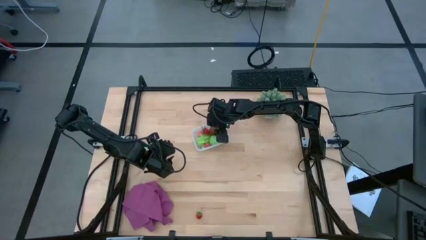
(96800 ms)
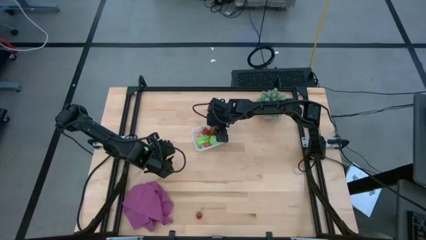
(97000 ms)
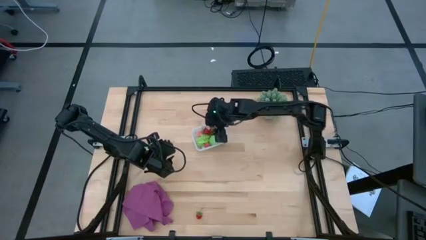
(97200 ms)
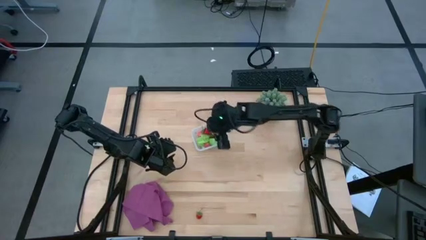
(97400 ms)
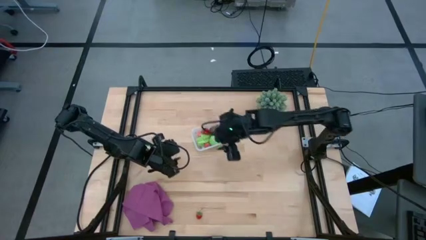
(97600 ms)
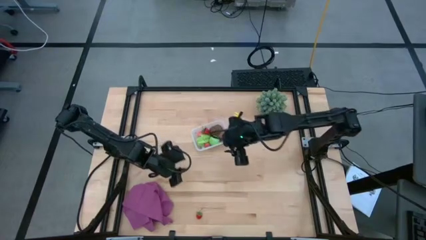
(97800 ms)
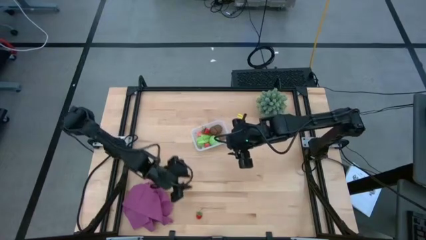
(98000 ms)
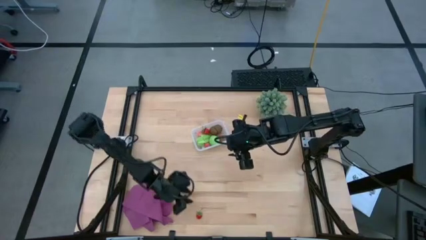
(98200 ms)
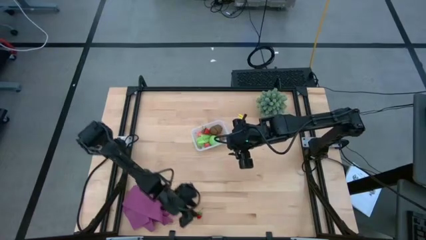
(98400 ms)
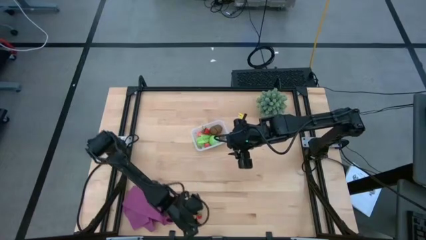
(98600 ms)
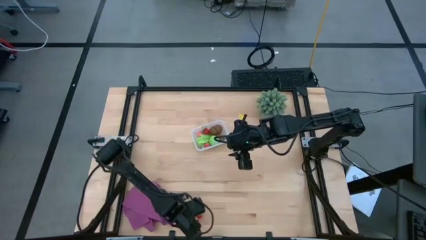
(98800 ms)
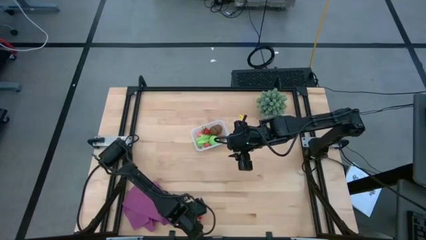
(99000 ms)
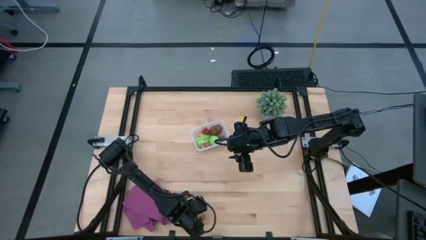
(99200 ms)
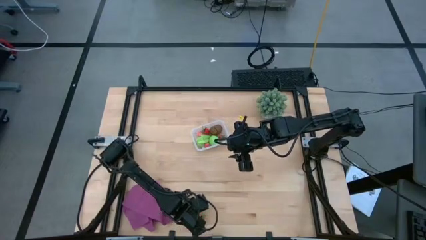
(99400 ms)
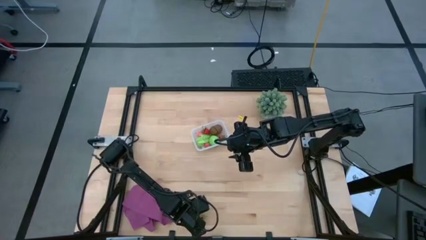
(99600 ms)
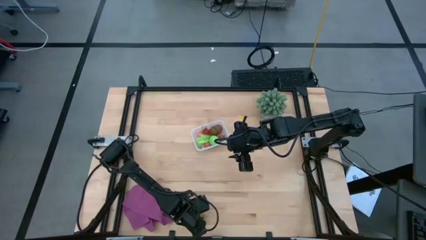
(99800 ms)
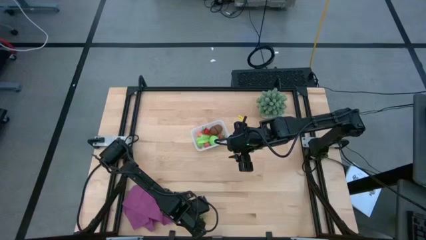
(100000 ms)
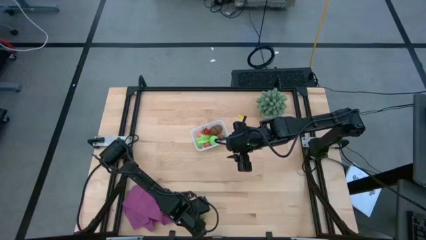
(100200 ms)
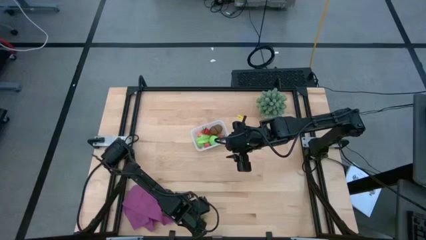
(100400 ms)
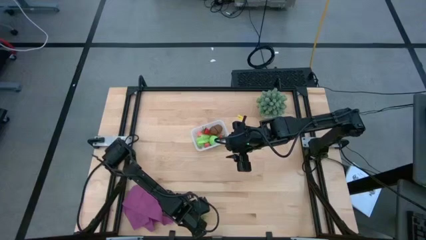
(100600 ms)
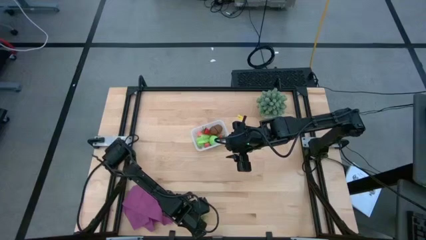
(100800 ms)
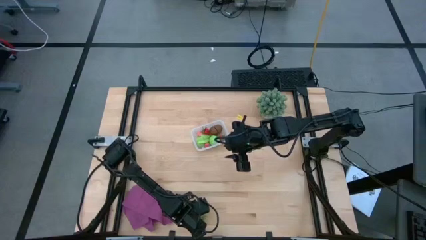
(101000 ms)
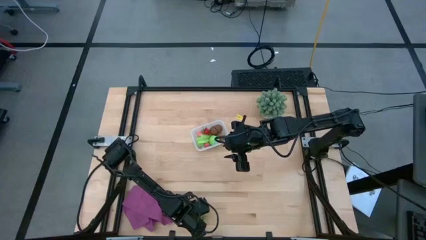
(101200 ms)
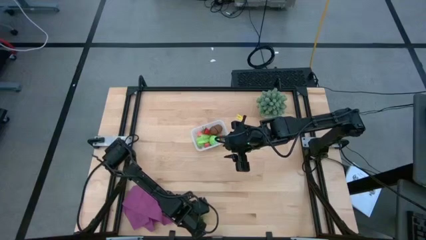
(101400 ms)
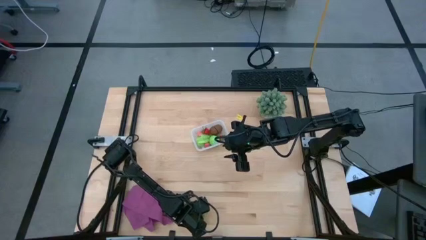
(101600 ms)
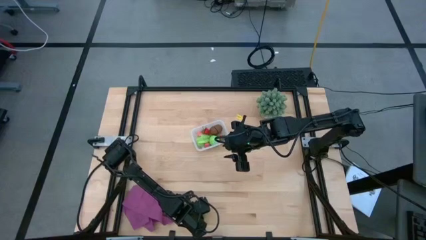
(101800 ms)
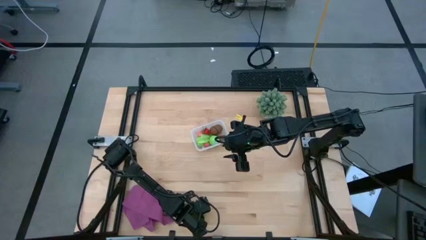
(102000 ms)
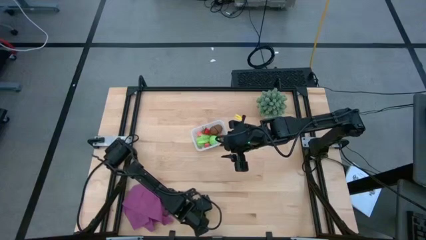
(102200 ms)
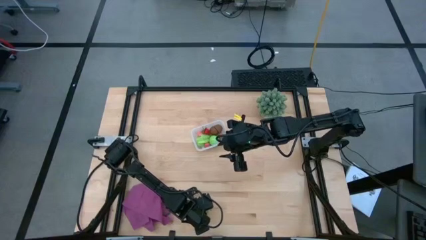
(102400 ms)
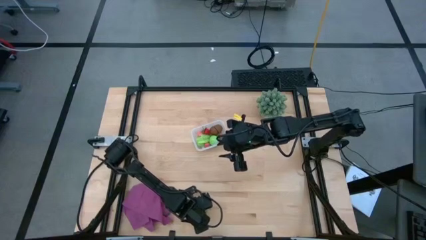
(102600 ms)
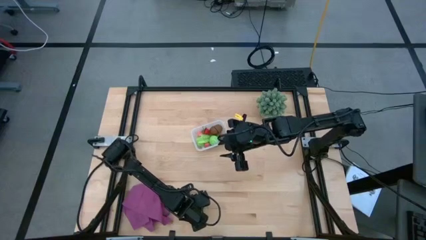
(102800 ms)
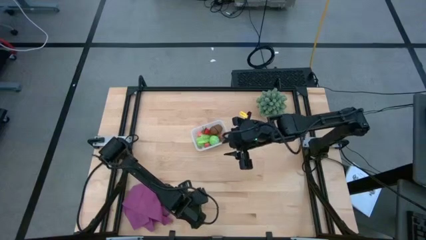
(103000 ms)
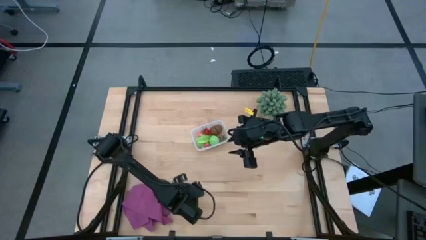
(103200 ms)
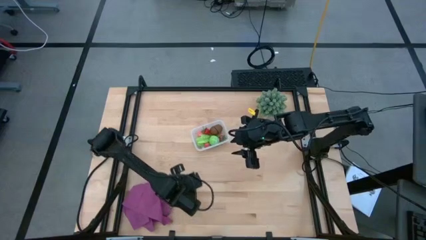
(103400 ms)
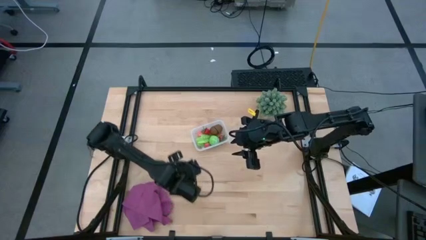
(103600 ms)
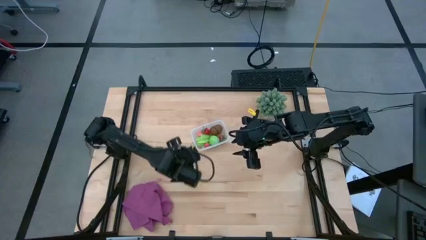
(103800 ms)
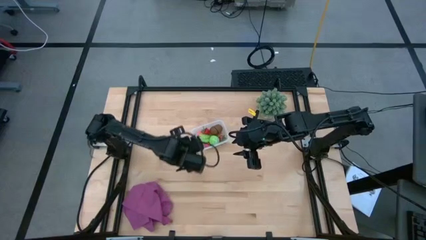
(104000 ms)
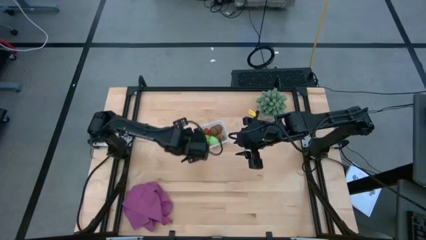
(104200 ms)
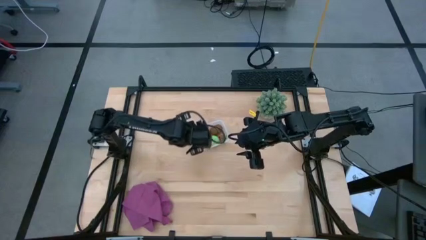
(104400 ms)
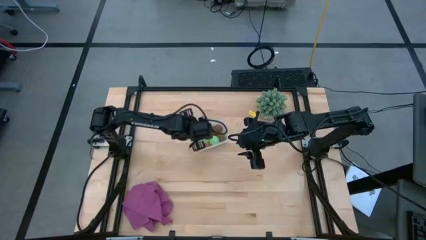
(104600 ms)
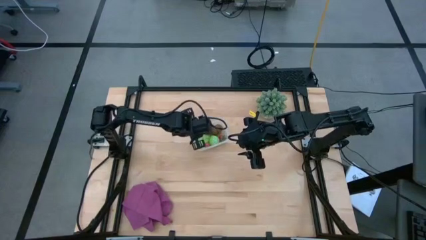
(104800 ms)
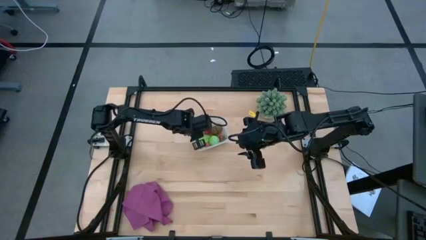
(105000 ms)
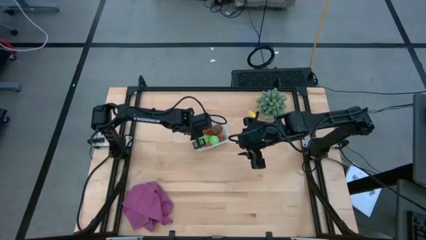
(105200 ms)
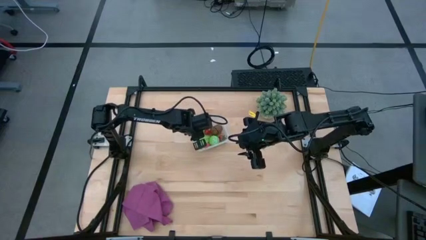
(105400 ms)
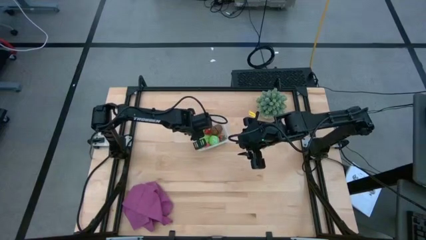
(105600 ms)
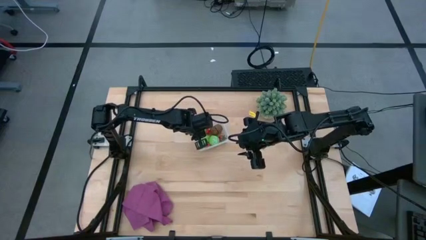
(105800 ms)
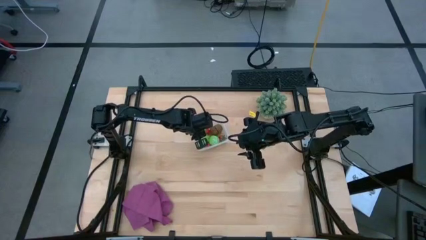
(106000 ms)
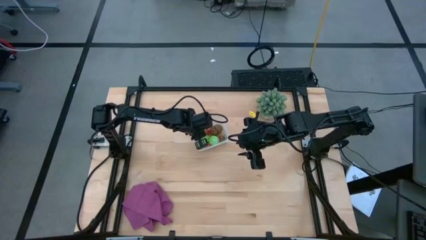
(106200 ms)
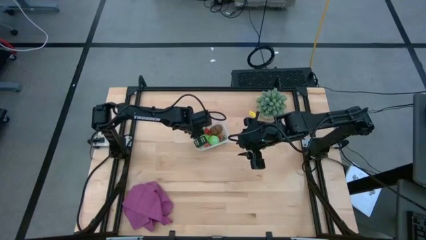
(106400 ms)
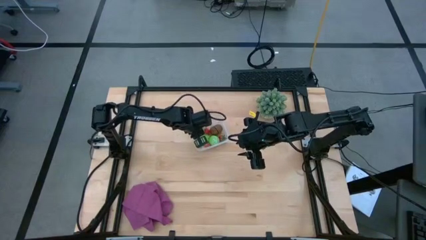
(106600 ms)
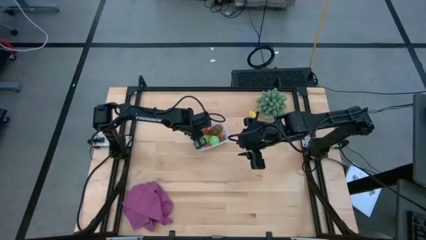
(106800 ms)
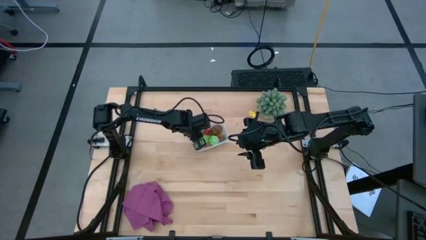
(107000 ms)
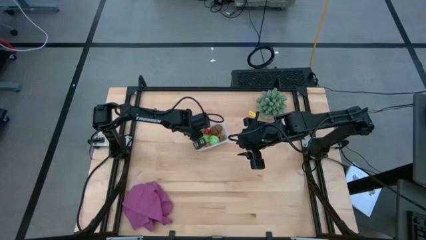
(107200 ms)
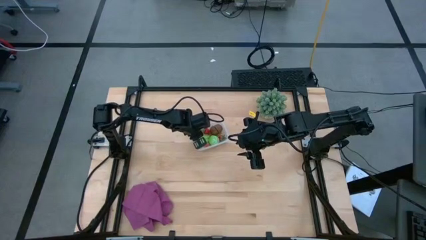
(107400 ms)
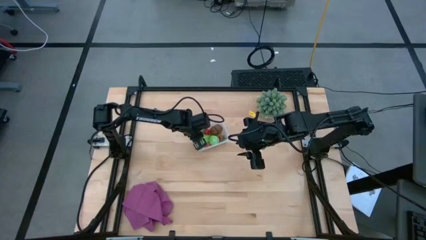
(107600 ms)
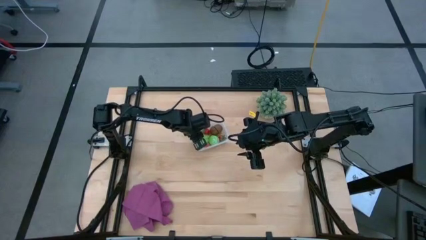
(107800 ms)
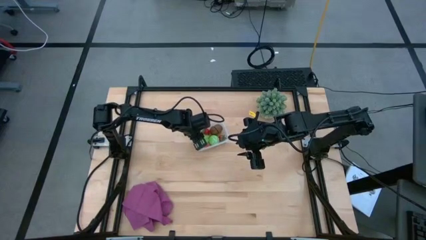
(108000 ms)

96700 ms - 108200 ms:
Task: Pick and placing Produce into tupperware
Put the red strawberry into the transparent container

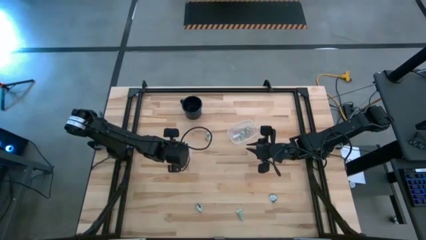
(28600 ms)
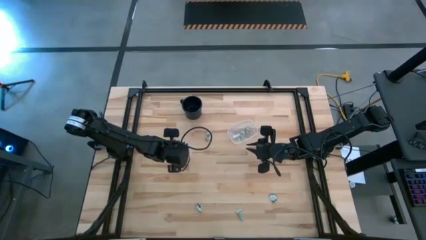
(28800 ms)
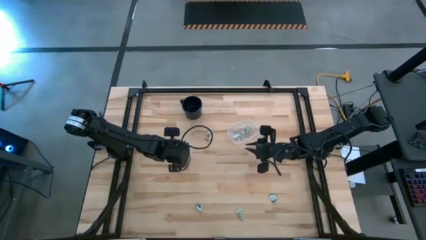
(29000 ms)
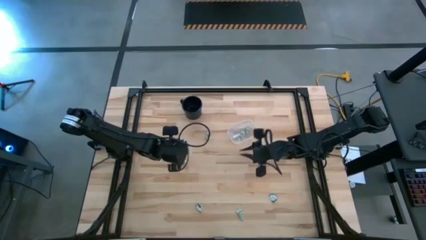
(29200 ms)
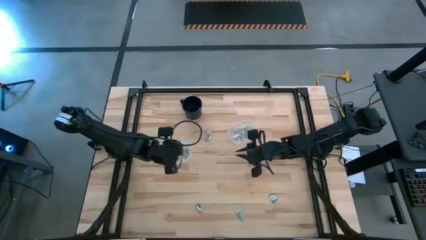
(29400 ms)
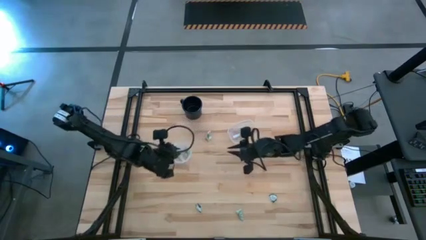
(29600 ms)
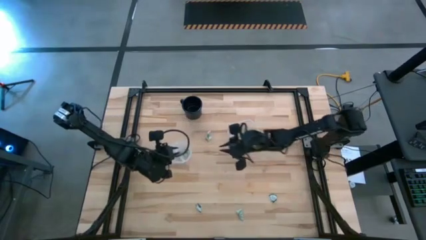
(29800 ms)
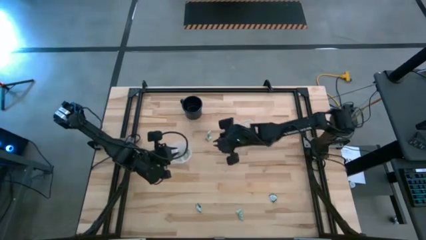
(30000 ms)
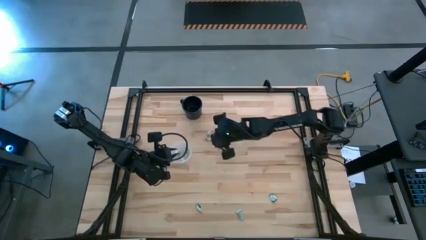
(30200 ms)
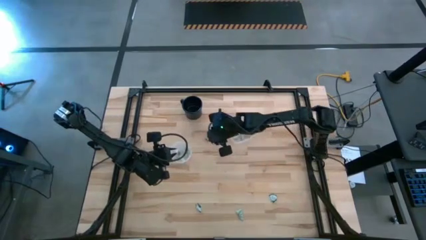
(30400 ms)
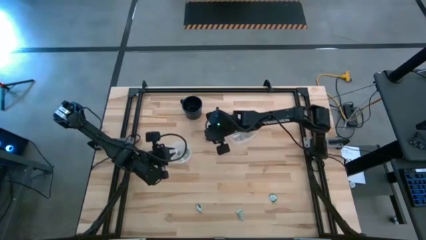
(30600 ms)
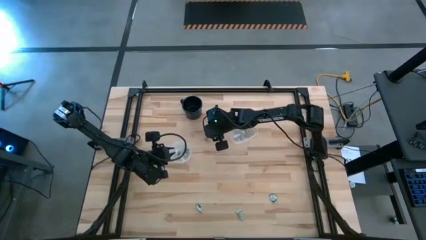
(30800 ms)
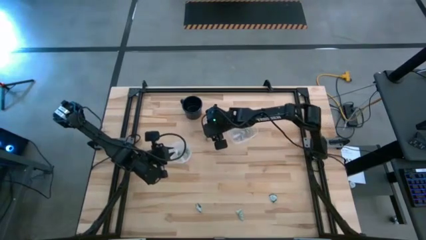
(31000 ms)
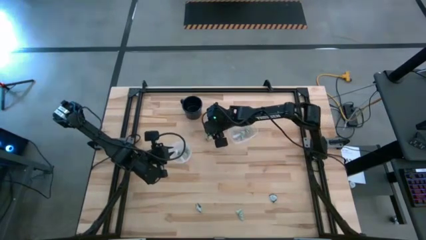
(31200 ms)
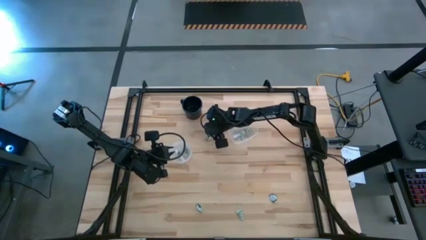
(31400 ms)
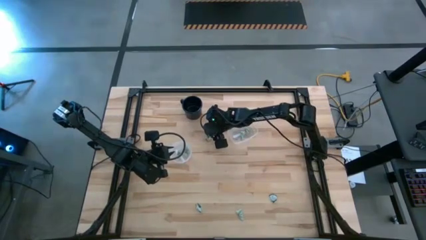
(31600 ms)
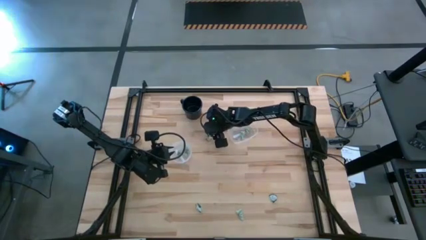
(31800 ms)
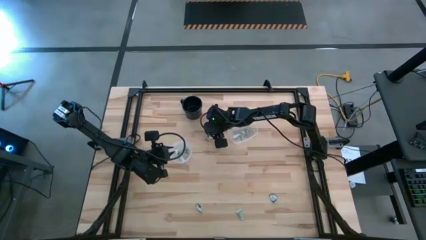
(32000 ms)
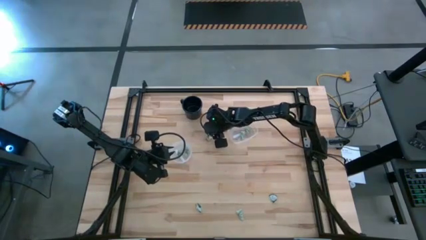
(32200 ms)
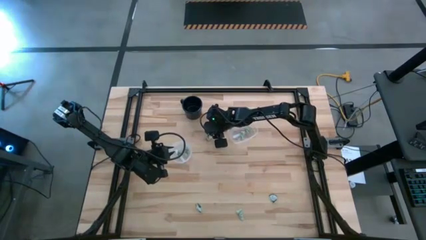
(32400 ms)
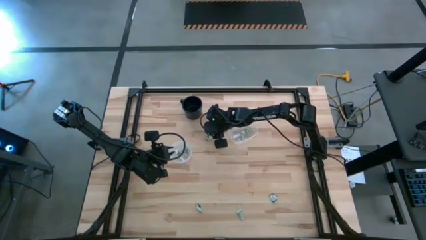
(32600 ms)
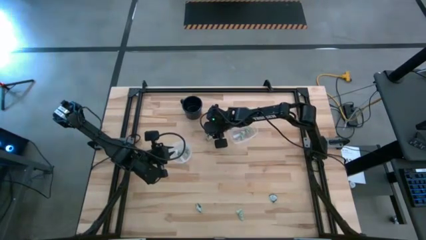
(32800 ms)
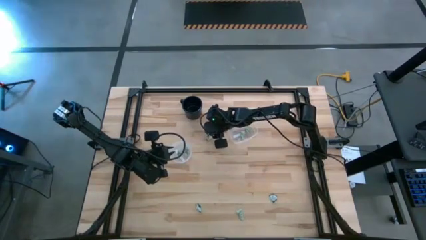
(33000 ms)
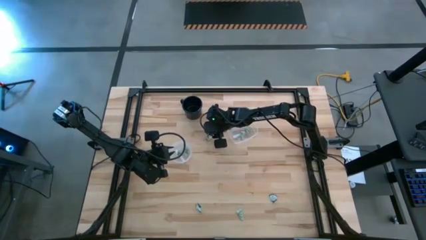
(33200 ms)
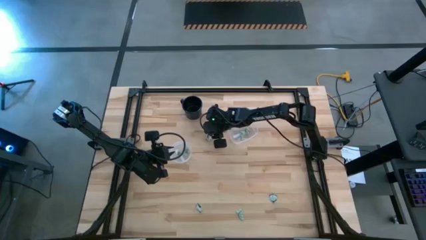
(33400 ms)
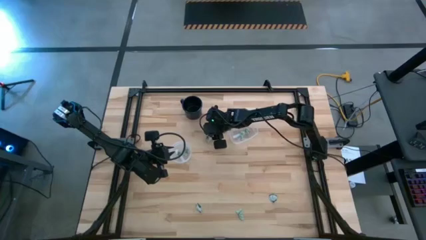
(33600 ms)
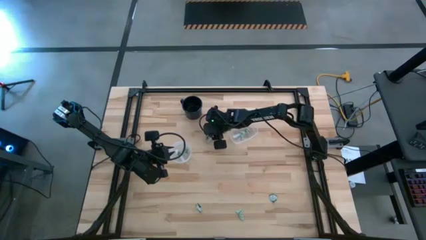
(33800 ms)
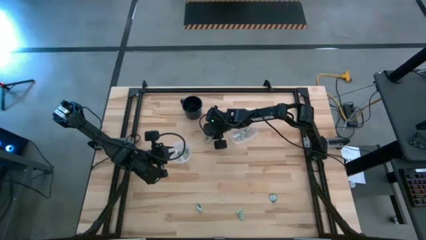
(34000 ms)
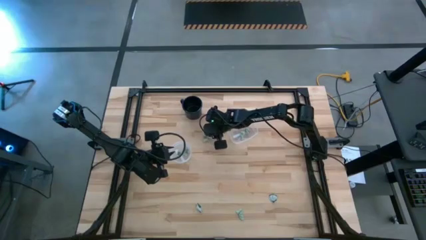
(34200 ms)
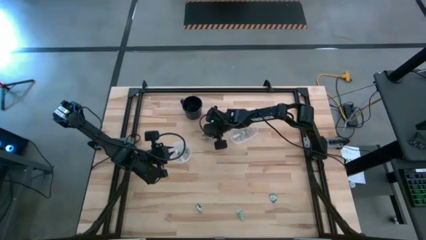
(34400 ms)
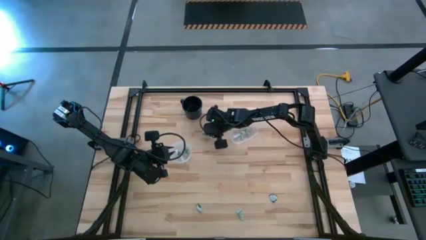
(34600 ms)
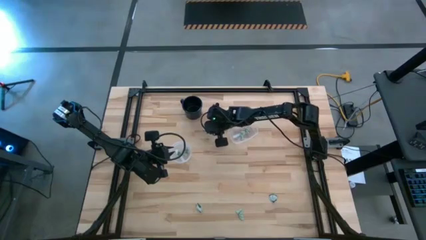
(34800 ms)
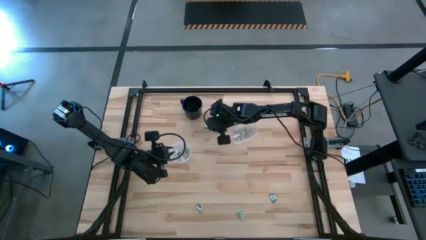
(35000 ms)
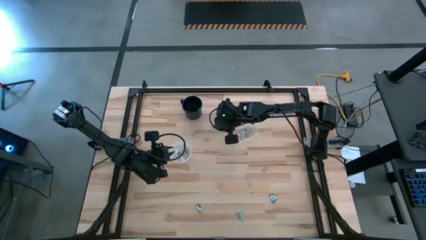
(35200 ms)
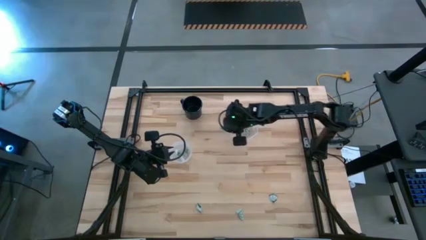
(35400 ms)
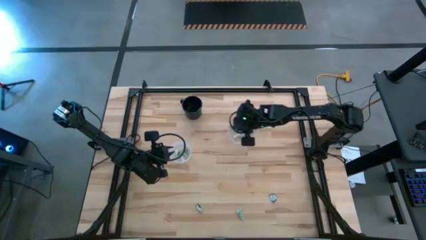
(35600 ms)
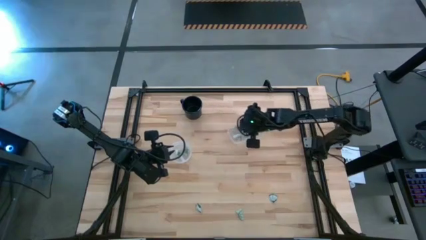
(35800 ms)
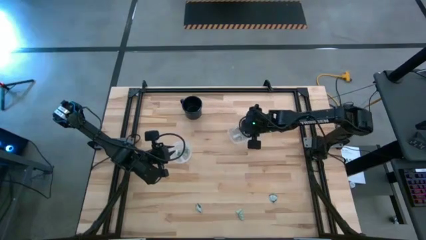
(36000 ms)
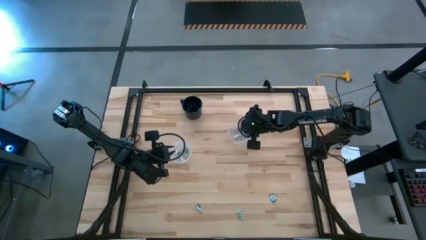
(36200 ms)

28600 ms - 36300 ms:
Task: Pick and place items into bin
Put the stevia packet into the rectangle transparent bin
